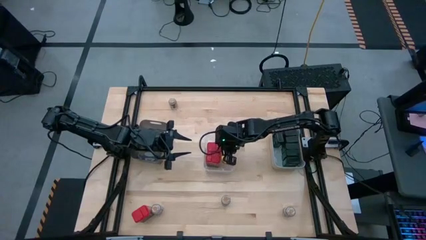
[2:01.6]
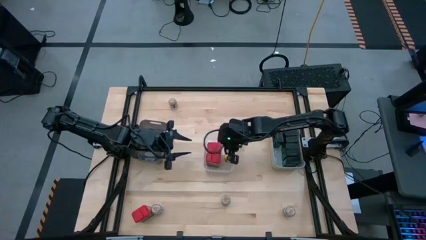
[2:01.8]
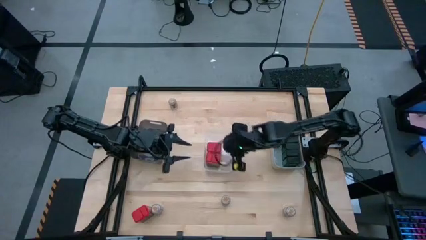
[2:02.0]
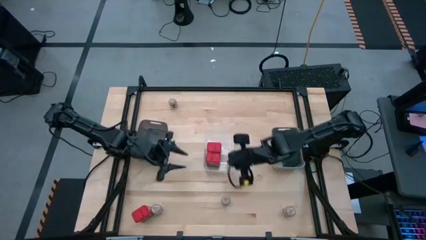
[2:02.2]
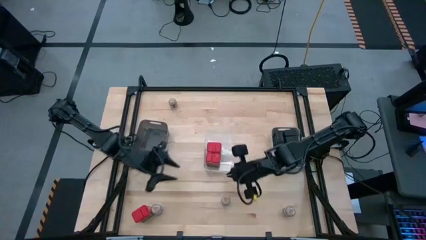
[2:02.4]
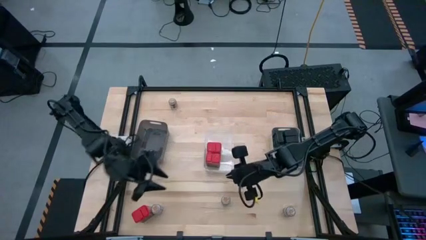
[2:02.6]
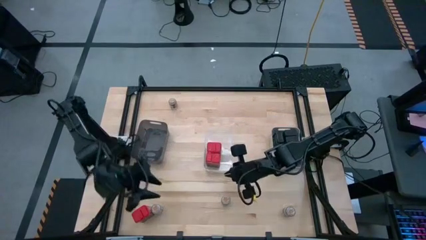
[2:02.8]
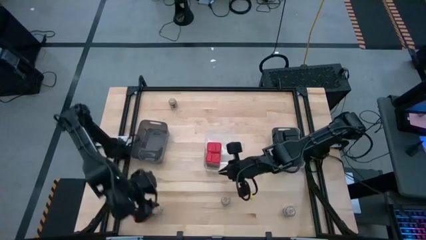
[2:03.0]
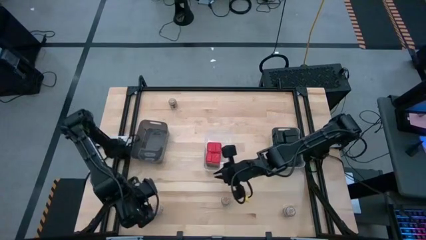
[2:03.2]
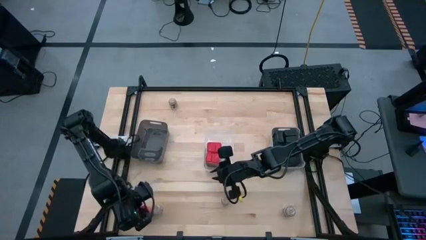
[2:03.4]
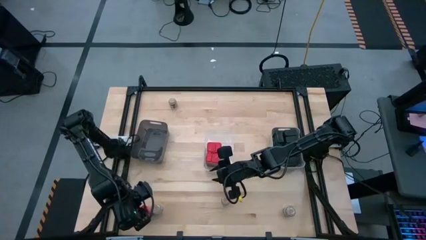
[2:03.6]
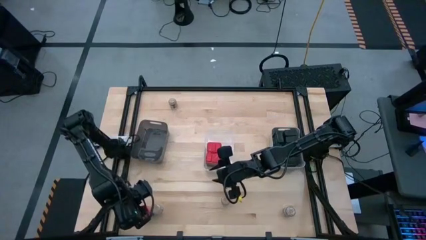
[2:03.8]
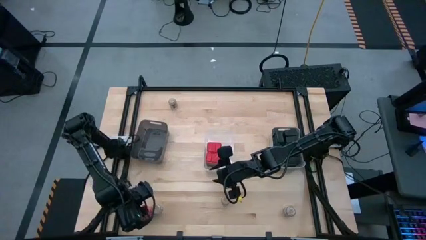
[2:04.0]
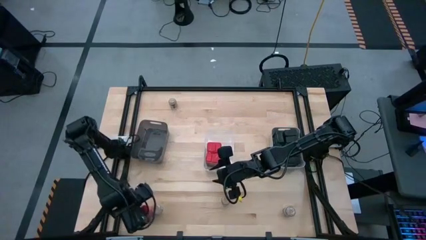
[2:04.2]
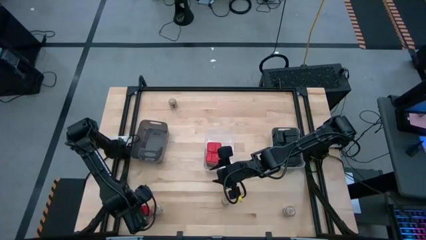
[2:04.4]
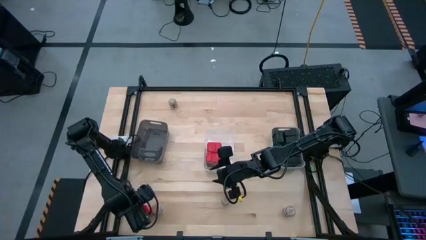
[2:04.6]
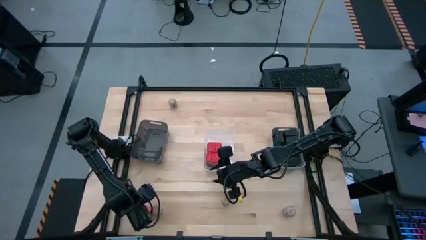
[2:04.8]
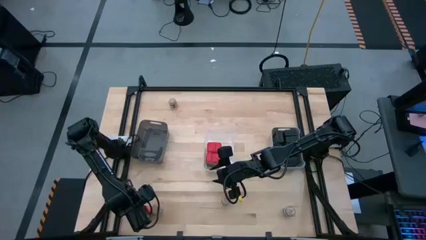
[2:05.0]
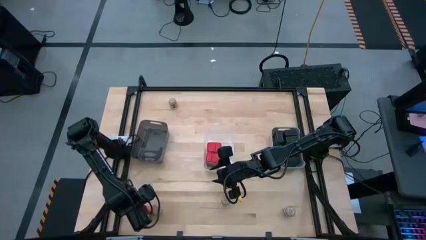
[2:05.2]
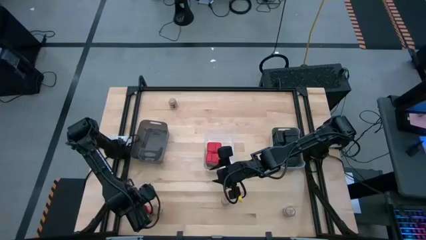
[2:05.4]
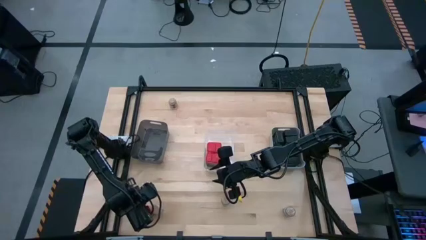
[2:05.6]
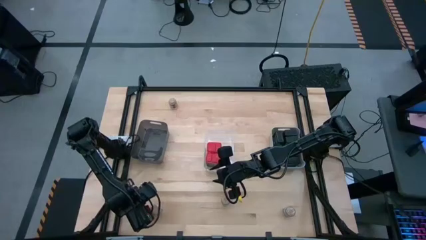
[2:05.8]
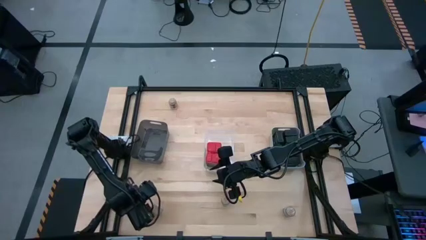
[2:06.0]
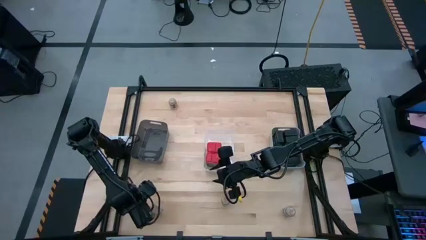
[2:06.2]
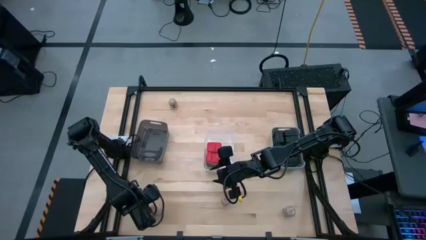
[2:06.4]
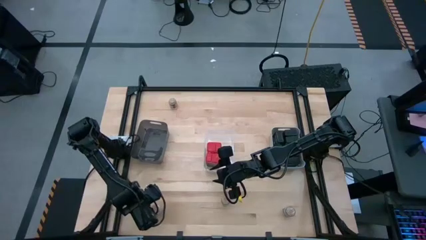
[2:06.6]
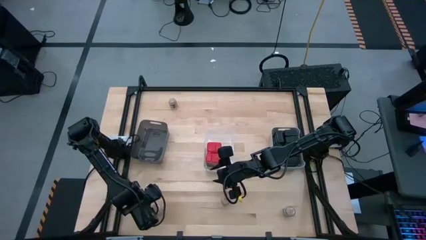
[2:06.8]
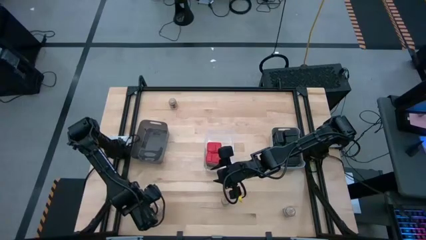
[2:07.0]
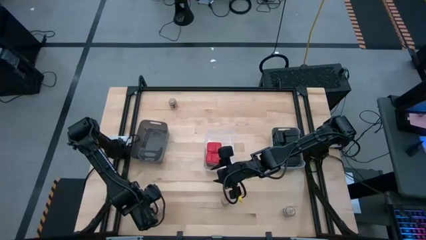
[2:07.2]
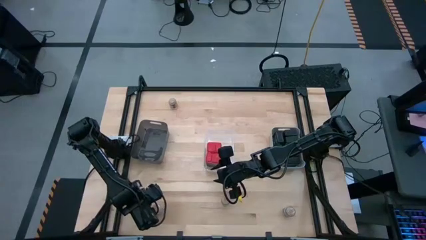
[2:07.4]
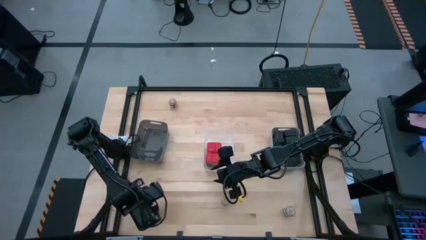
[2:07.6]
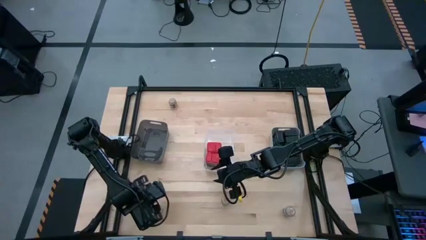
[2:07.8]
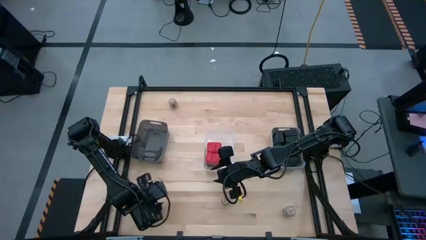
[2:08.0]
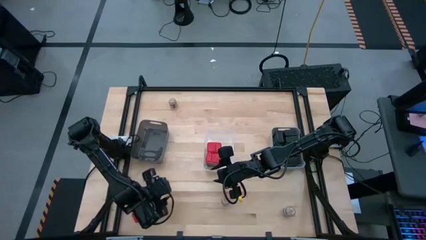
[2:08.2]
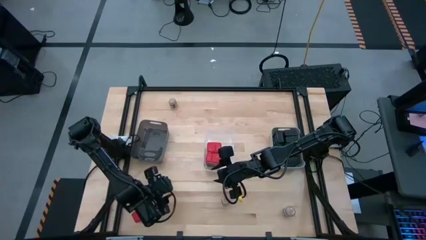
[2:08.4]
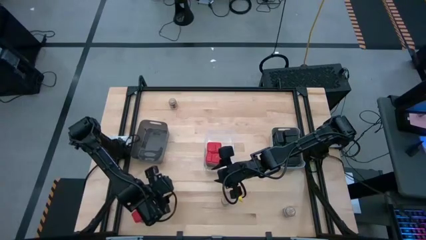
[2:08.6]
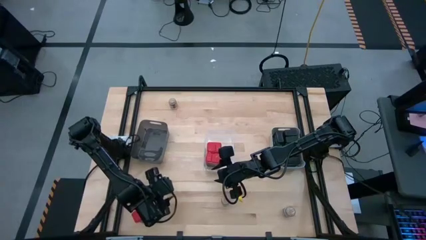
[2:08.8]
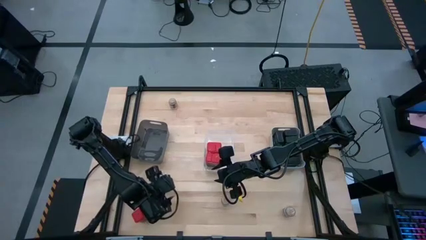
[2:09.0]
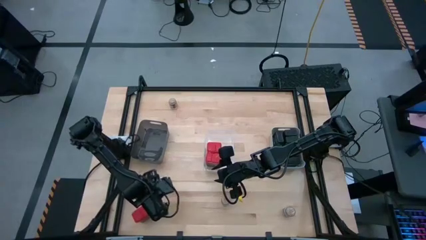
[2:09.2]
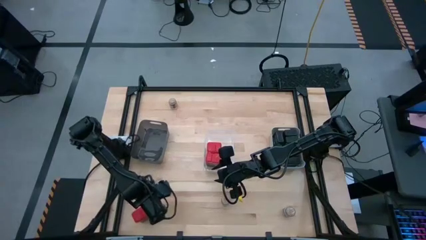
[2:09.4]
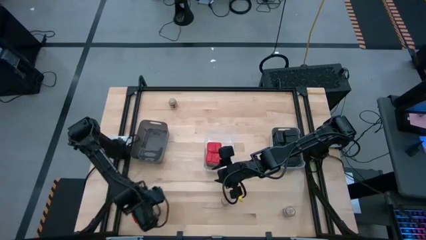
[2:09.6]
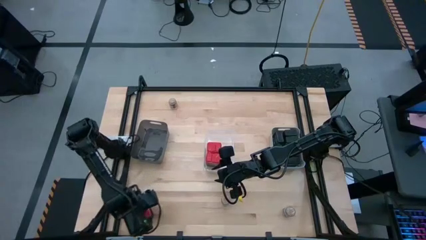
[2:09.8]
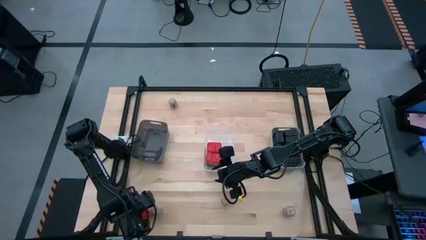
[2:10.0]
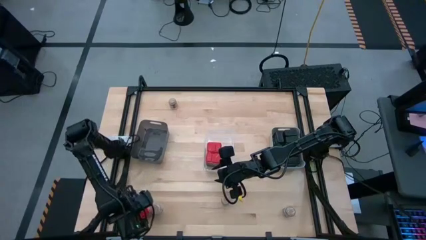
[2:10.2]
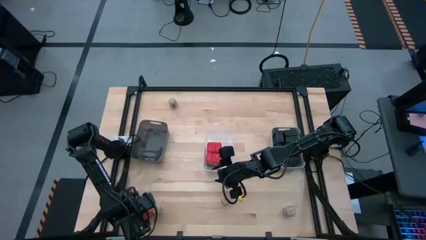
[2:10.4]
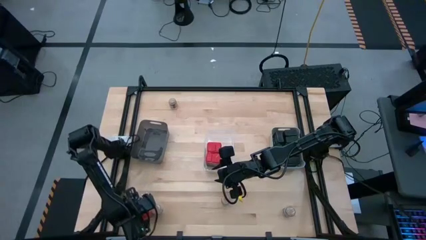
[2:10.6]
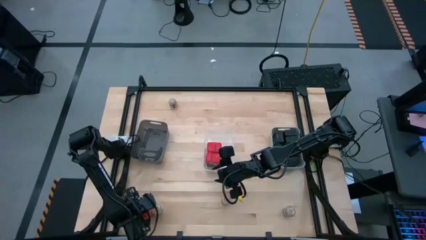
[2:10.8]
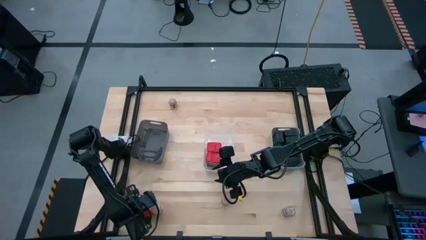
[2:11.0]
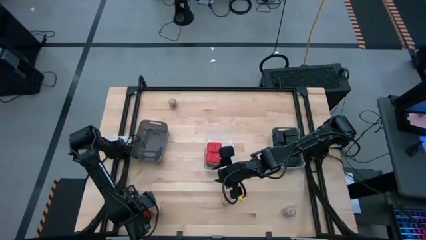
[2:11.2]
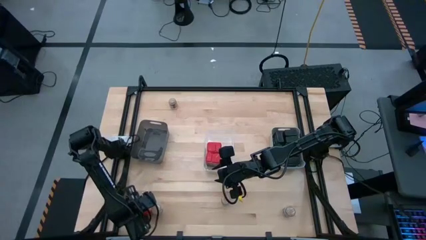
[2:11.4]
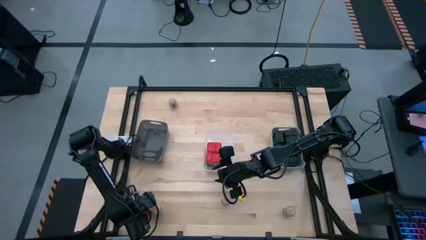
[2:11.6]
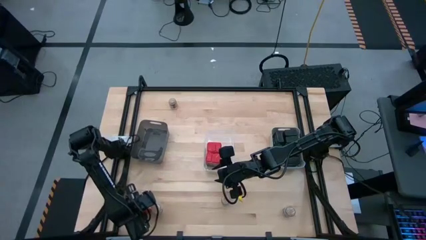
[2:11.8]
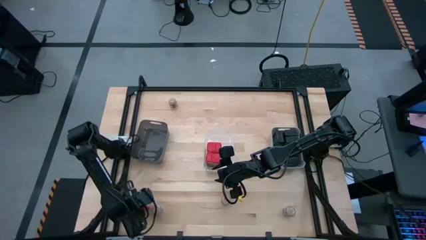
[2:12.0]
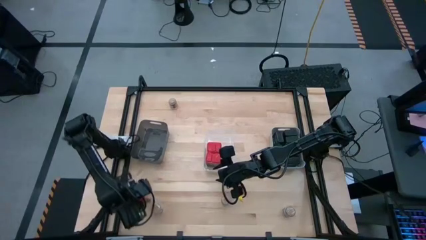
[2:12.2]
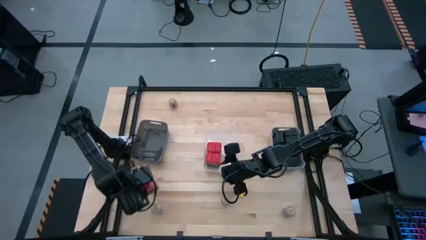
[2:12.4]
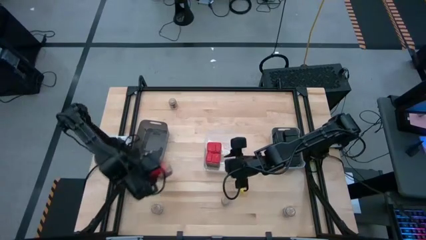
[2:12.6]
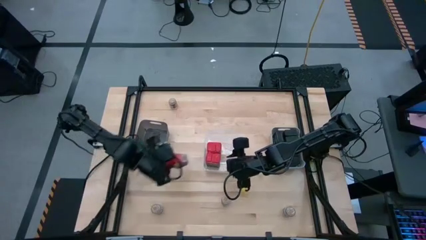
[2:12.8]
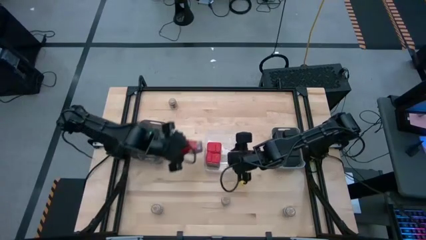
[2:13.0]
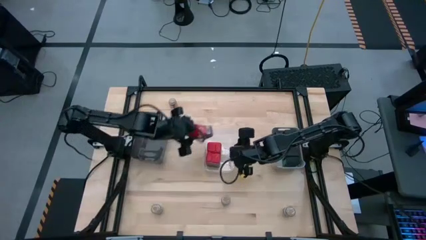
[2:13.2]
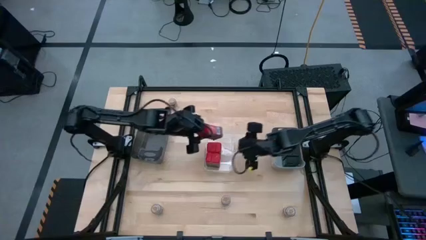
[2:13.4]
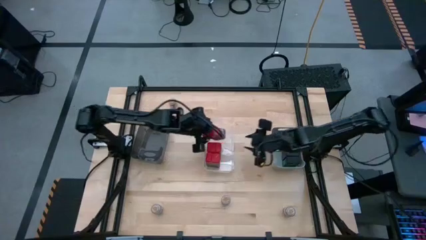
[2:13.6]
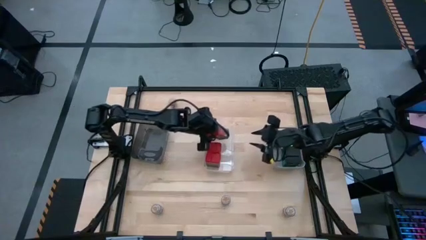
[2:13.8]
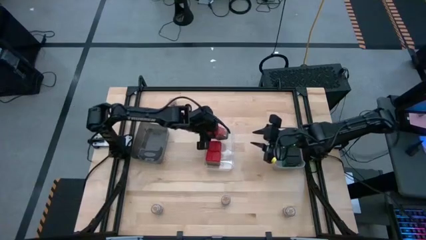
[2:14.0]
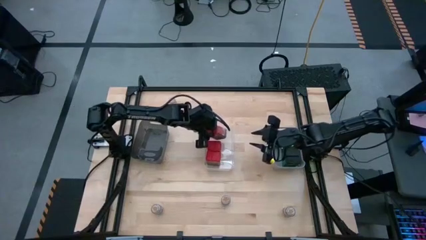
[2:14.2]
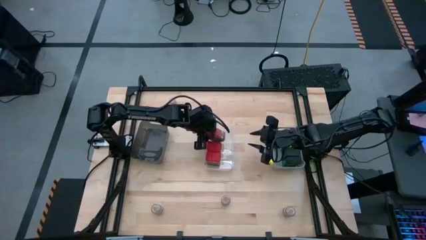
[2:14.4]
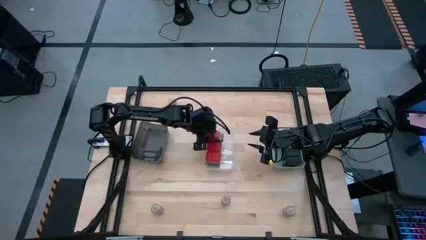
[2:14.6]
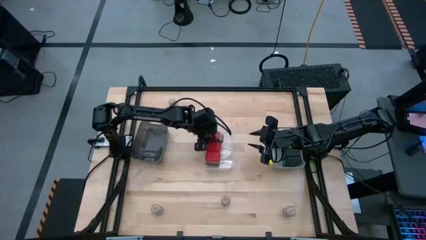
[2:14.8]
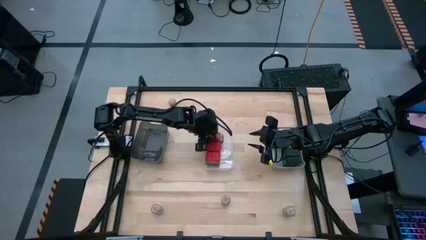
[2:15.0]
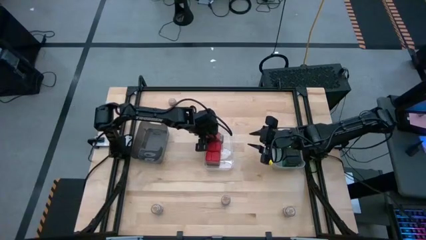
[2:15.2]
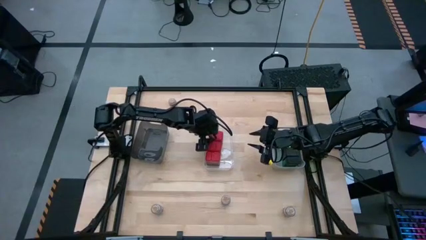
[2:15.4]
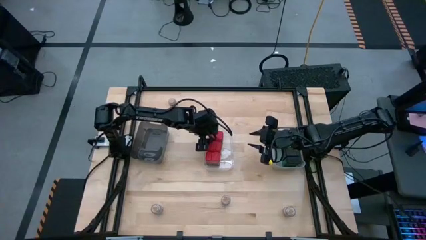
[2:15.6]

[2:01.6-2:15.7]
Task: Sort spices by type
Put the red seasoning can into the transparent bin
